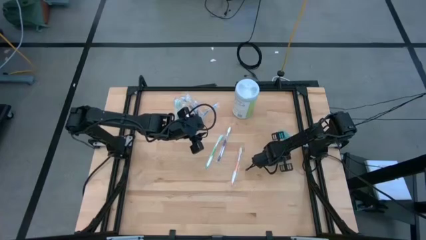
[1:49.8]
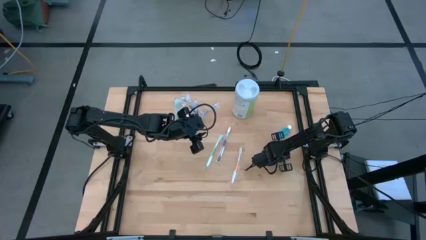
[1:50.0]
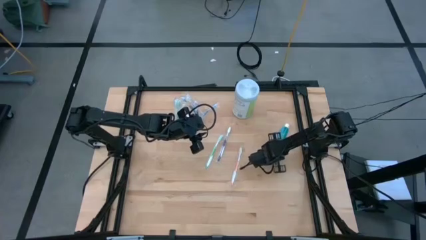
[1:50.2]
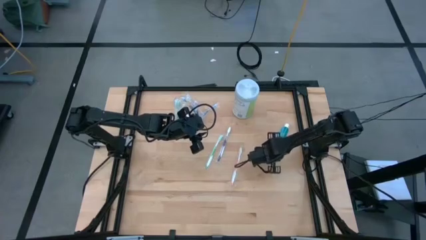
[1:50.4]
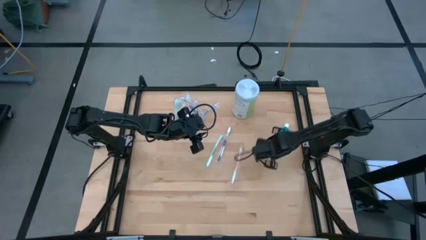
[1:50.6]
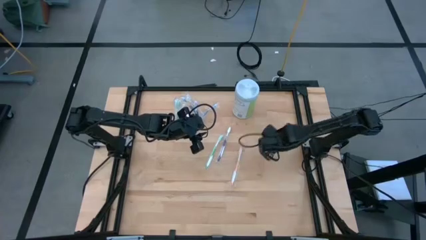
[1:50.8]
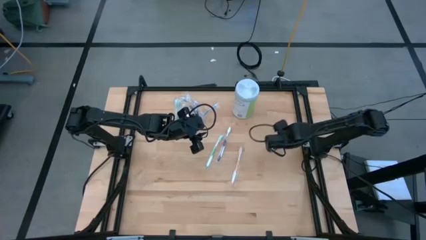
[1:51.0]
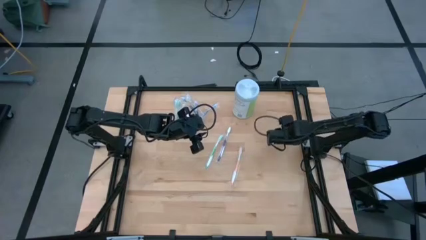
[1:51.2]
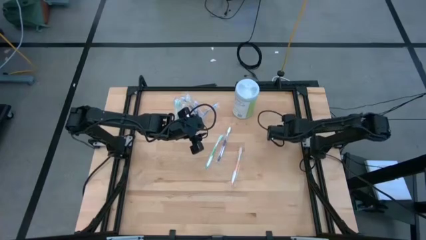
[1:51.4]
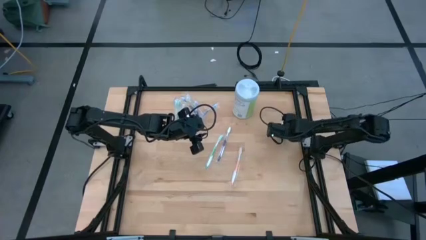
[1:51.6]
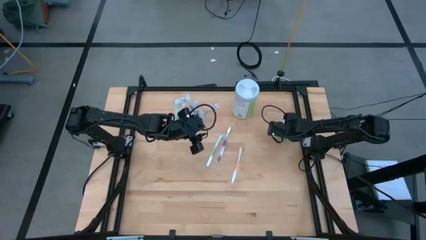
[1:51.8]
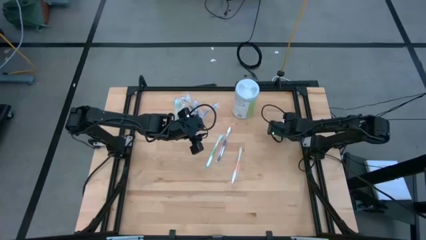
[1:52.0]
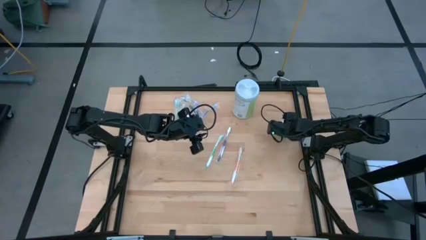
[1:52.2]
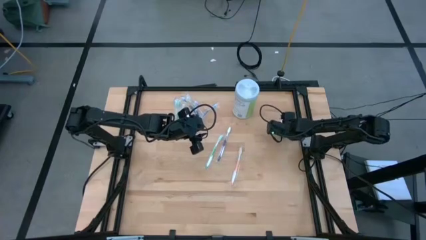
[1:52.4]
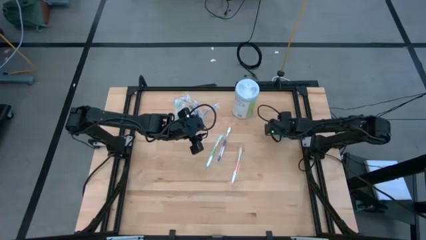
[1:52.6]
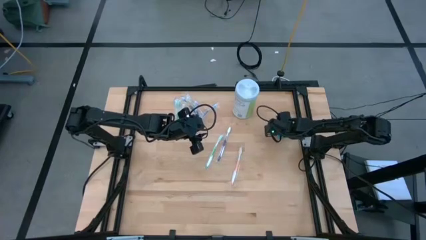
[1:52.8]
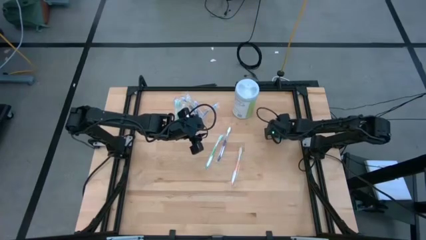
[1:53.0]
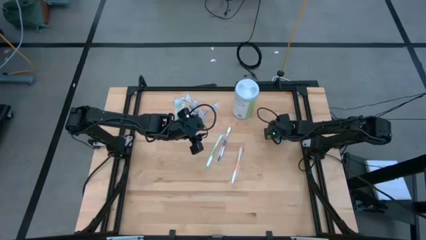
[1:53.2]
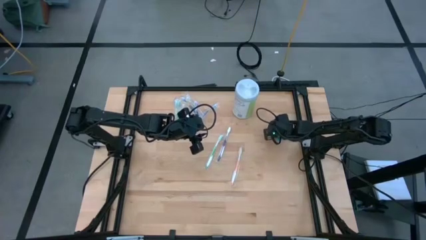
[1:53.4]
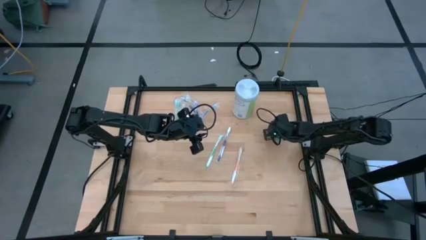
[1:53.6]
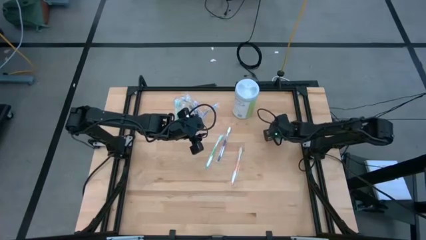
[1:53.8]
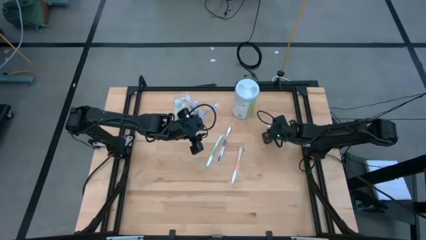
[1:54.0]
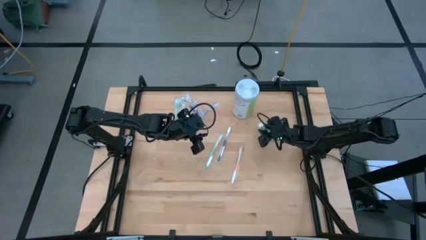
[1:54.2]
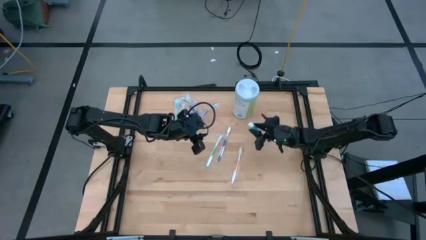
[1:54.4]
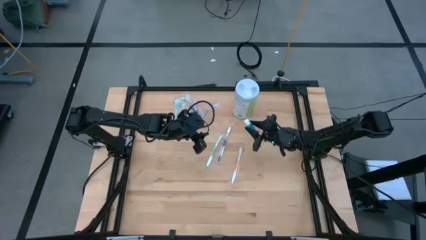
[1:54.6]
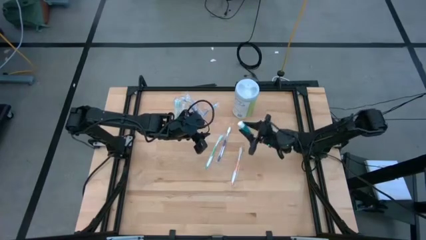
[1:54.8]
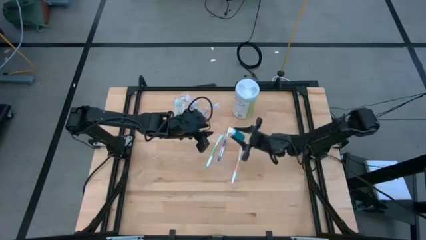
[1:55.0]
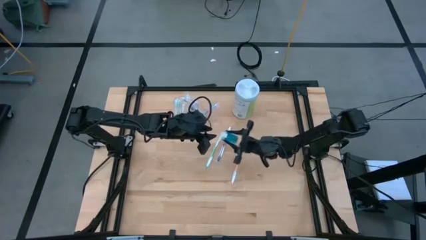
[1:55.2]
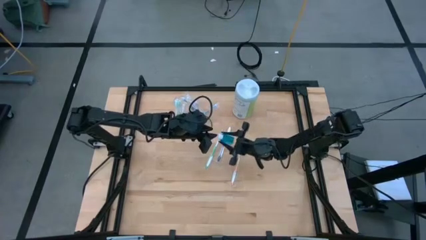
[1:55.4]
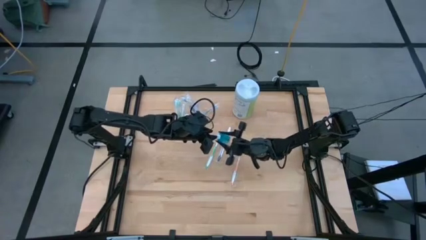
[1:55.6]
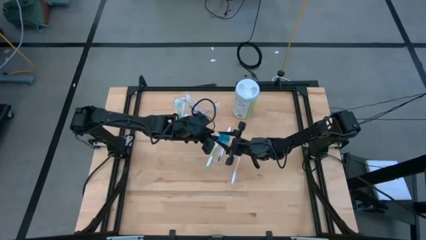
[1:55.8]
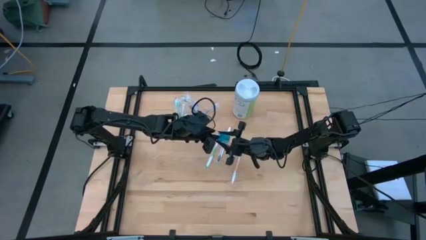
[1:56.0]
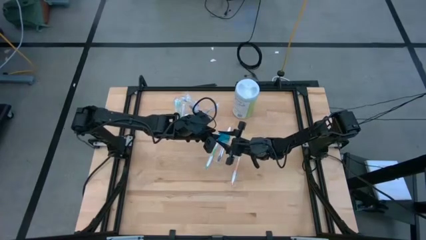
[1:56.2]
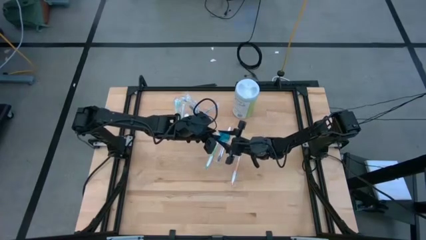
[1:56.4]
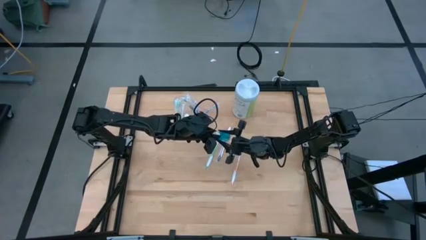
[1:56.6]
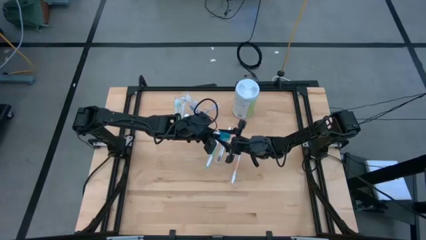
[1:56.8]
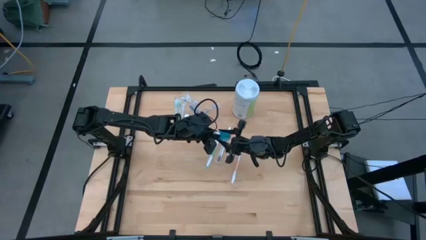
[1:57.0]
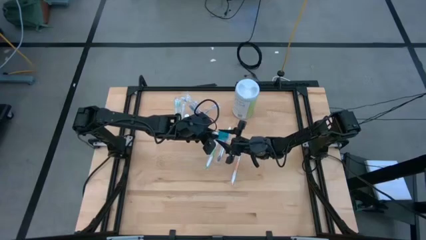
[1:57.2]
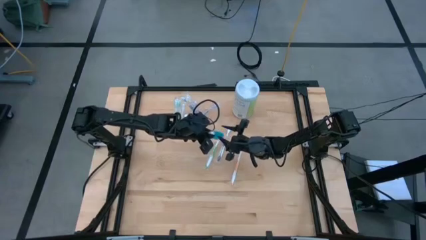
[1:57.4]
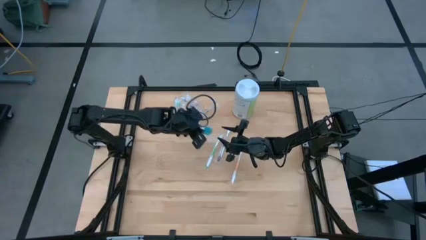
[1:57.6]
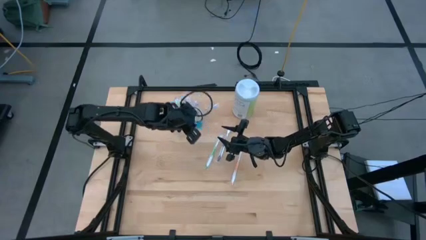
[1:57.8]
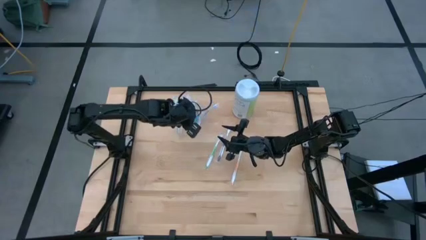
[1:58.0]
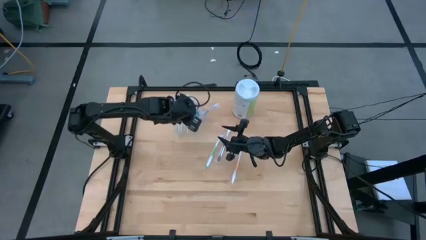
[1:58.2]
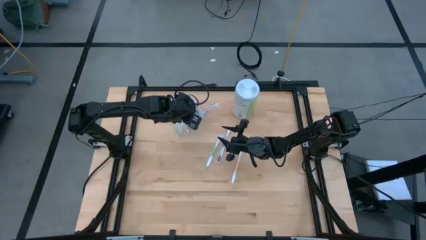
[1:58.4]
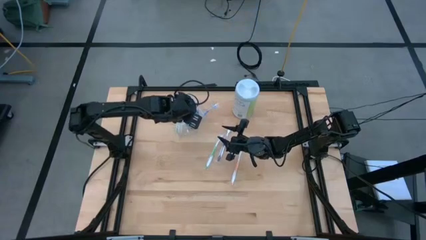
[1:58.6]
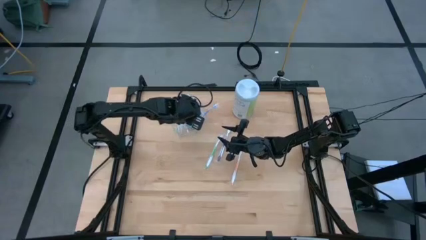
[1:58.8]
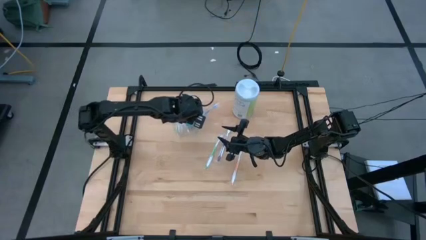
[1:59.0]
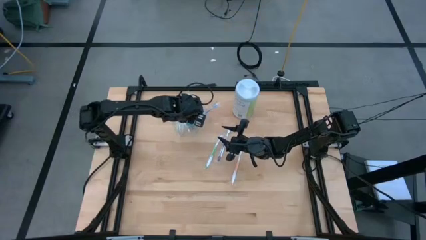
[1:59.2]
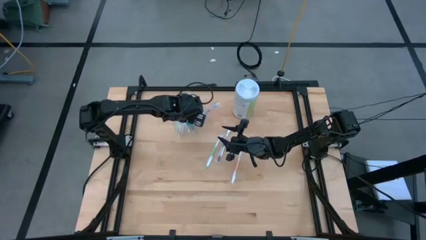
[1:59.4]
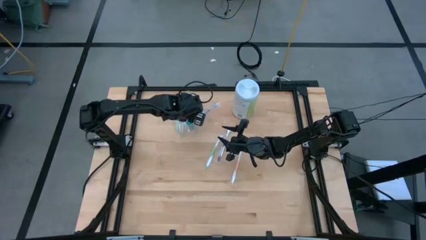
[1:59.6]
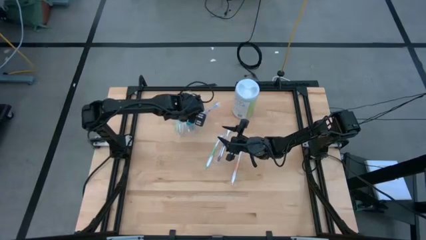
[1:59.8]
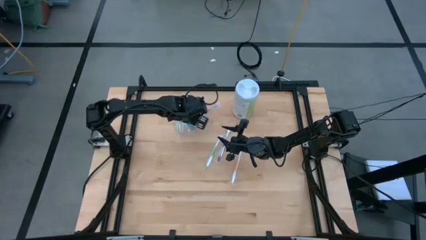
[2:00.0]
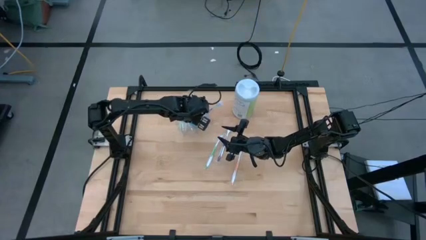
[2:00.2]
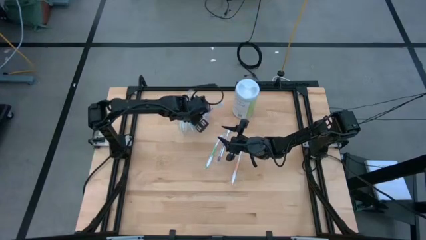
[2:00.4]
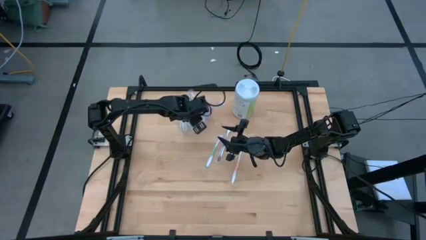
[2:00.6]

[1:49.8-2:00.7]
Task: Pick & Place toothbrushing station
Put the mouthwash into the transparent organizer

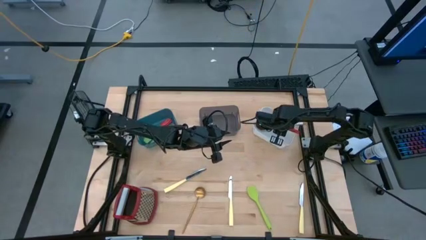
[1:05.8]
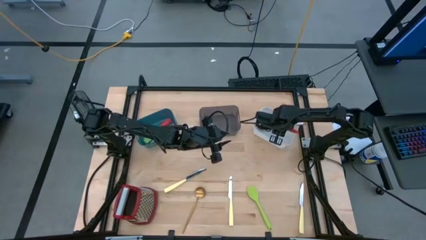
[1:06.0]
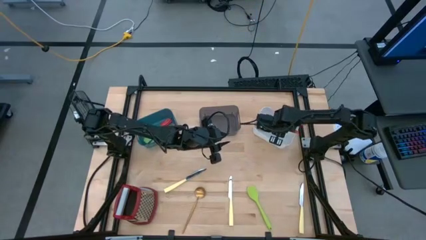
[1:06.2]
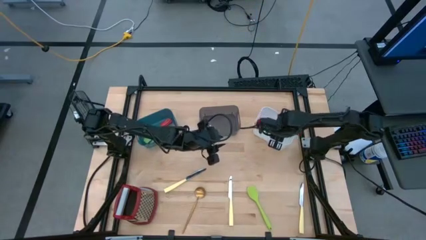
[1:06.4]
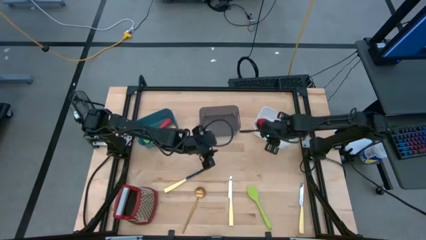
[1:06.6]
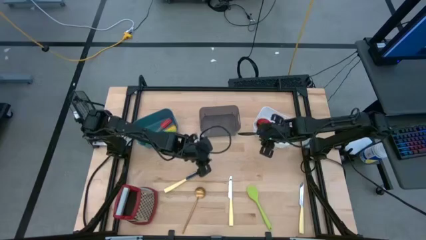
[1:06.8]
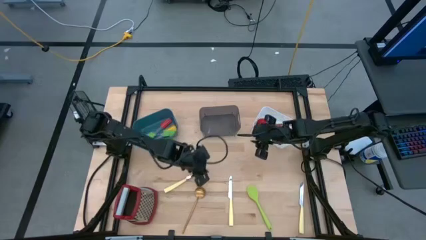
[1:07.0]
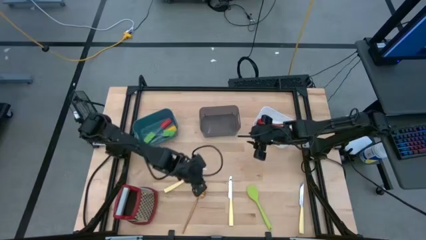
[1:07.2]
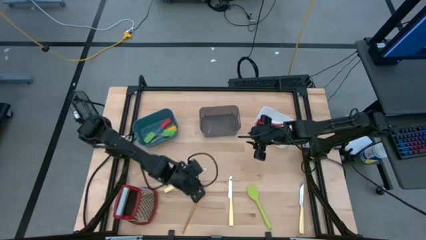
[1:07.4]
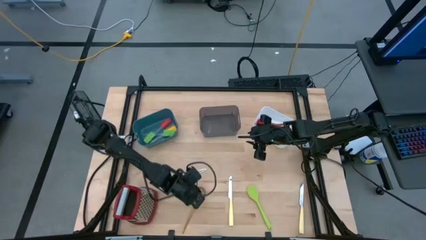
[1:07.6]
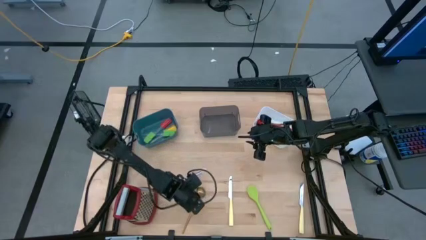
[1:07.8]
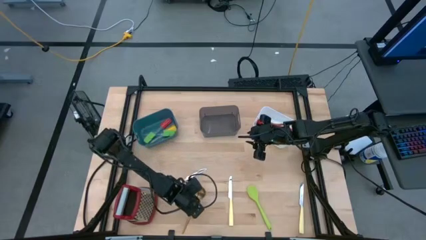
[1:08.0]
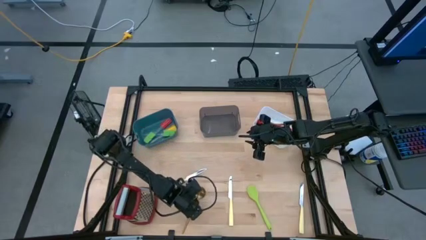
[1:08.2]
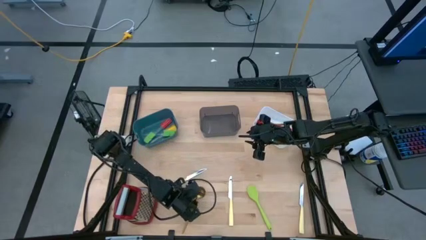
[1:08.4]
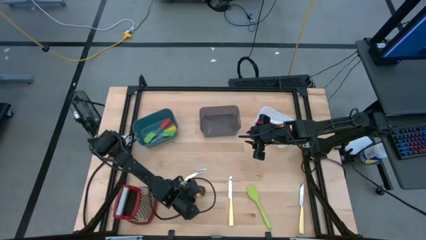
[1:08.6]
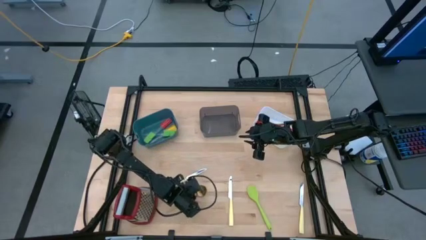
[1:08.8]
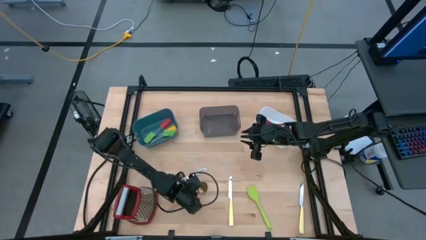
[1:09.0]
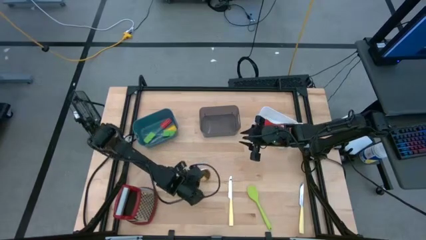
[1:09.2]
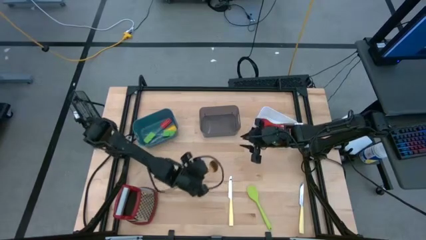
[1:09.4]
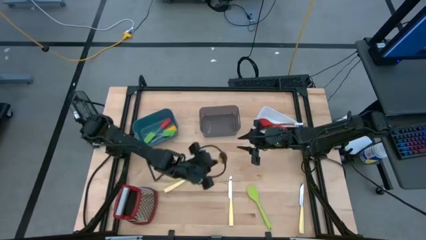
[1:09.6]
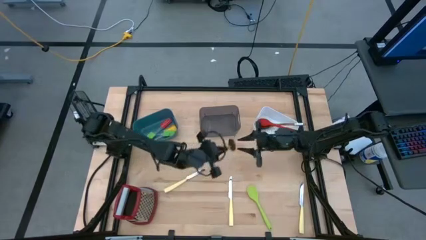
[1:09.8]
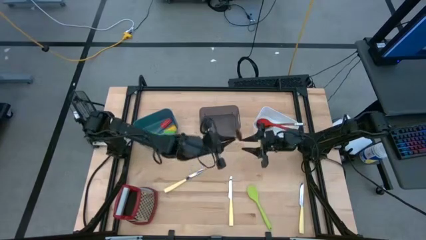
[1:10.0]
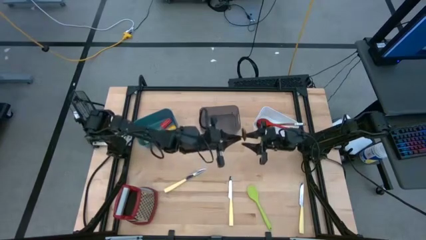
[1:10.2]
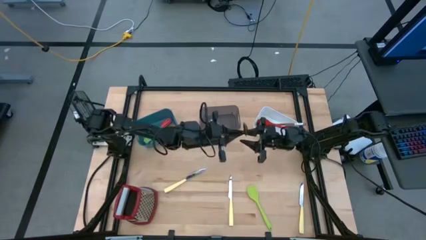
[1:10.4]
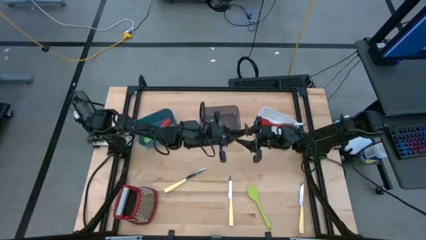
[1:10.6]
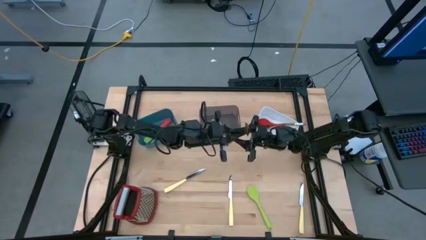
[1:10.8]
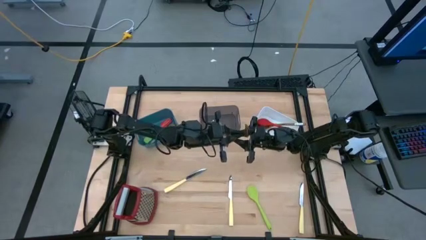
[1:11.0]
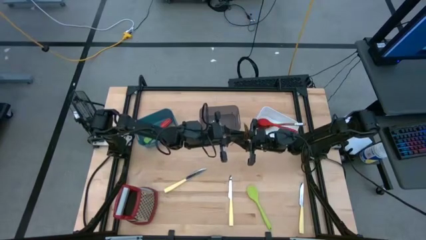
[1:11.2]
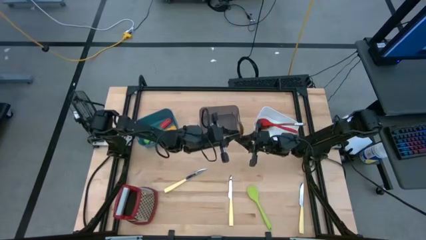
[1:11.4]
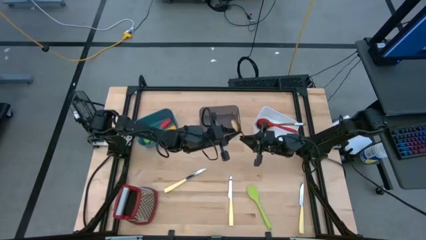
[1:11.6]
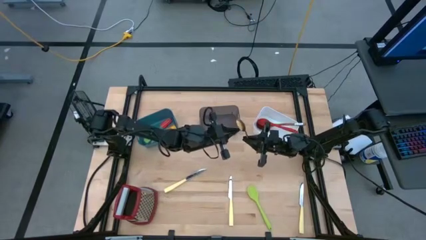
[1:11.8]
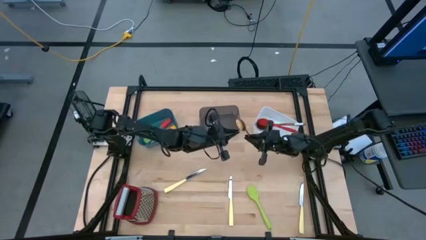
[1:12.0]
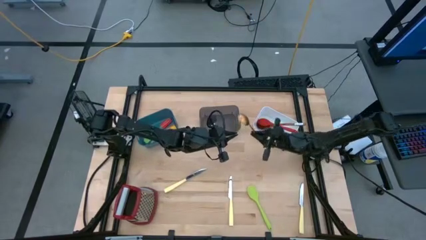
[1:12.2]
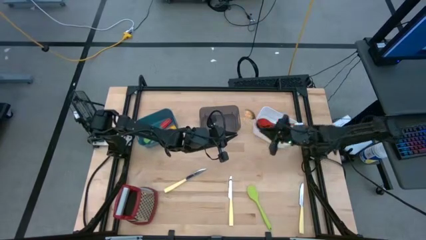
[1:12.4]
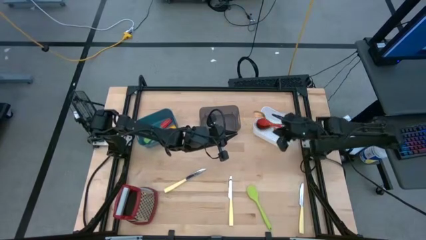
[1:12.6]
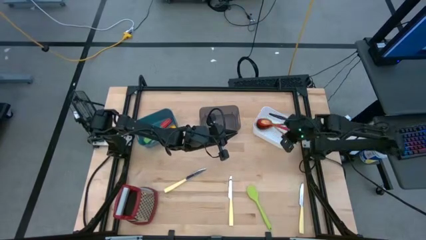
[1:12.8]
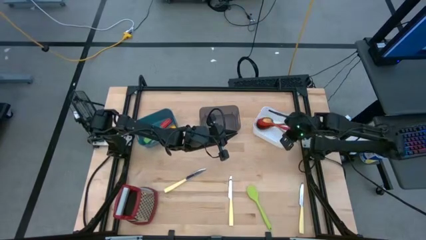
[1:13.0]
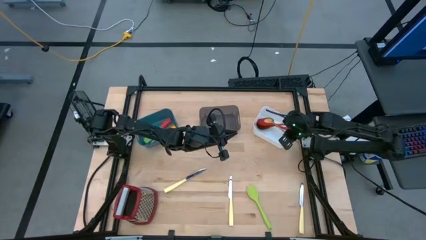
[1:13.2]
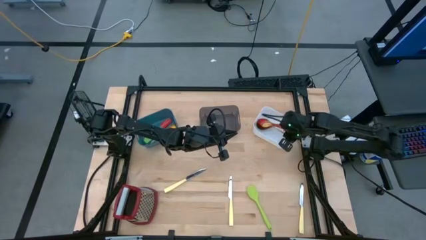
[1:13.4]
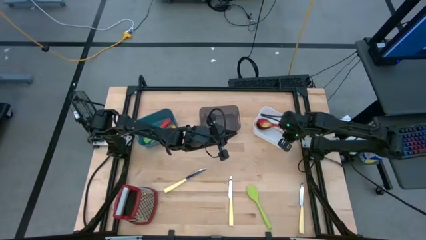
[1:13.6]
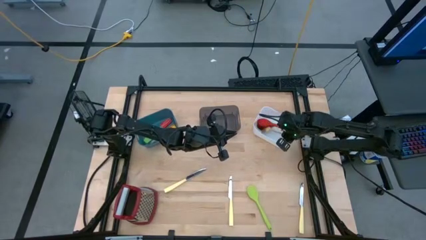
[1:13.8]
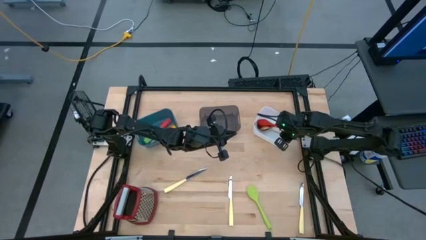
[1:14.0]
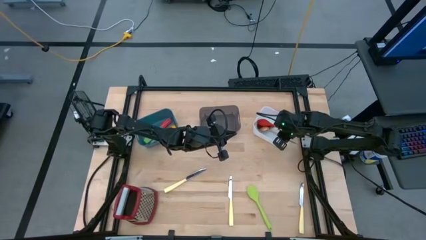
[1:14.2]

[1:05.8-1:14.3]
Task: Pick & Place Kitchen Items
Put the gold serving spoon into the white bin
